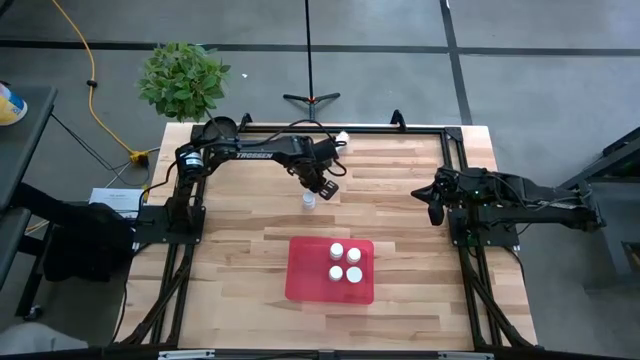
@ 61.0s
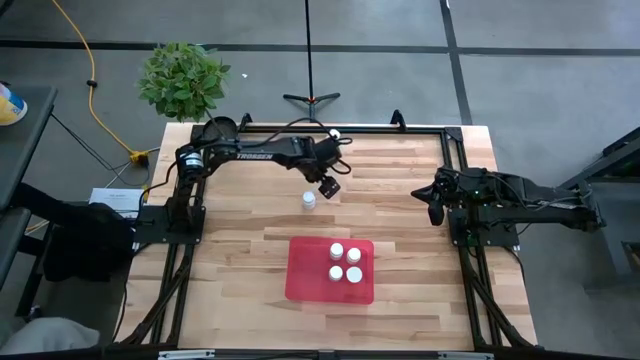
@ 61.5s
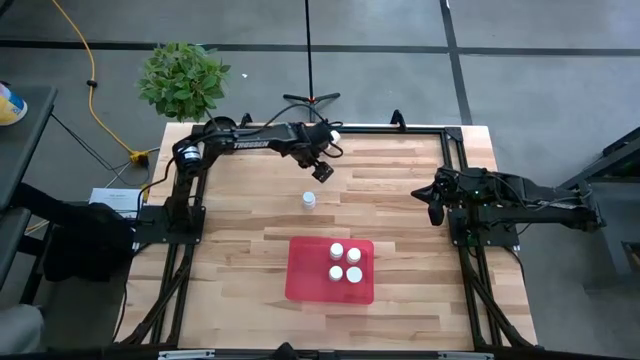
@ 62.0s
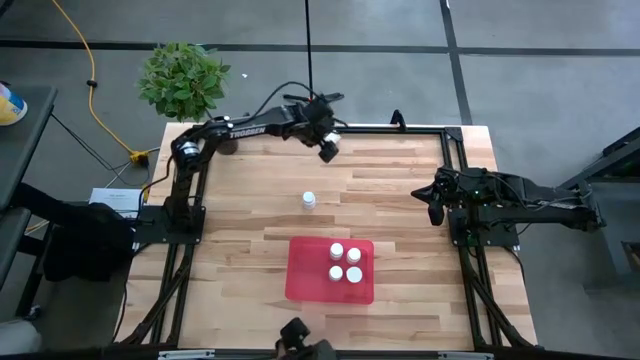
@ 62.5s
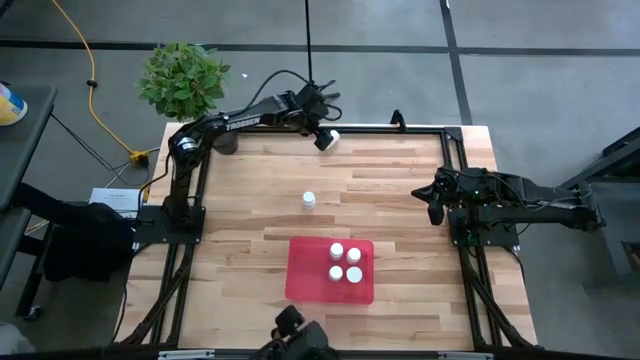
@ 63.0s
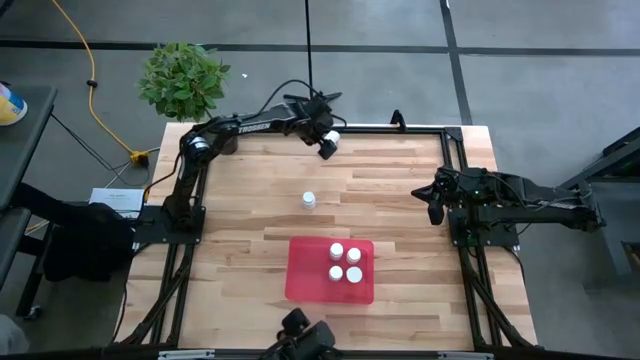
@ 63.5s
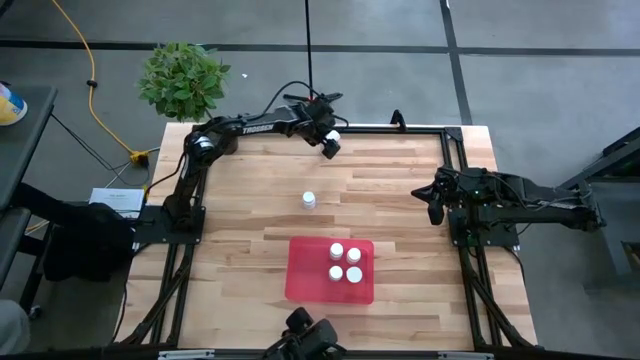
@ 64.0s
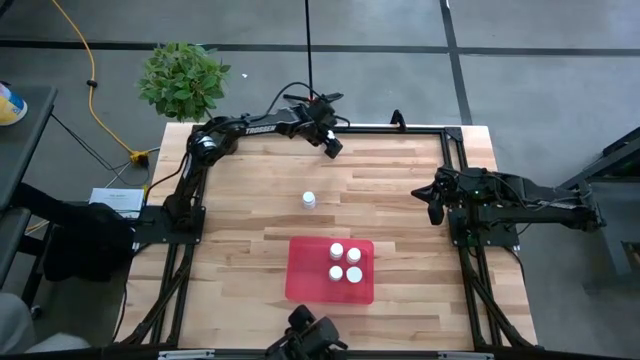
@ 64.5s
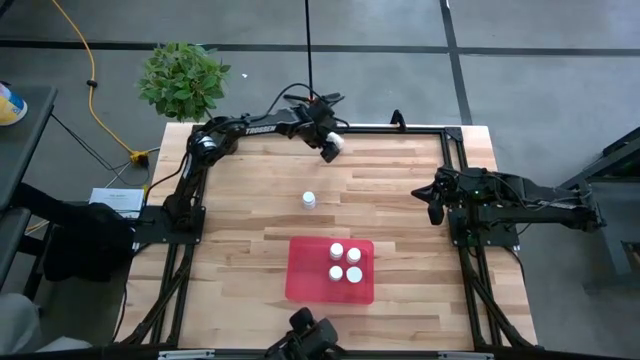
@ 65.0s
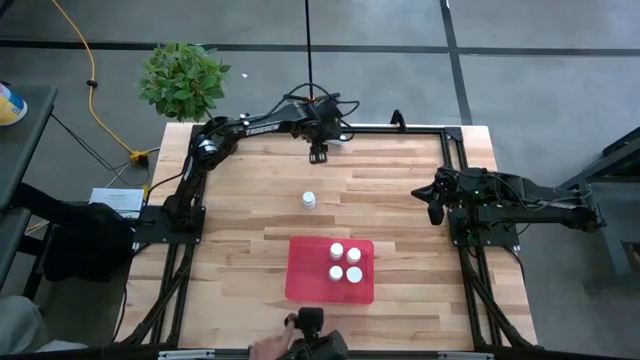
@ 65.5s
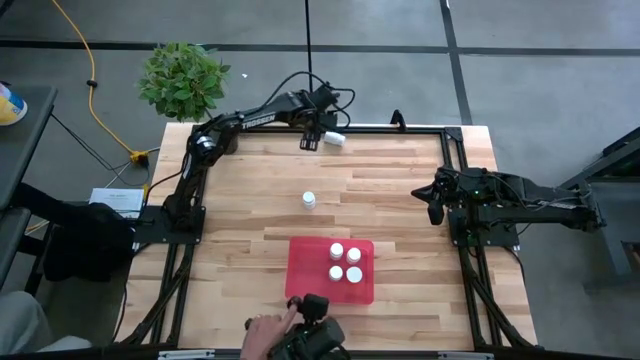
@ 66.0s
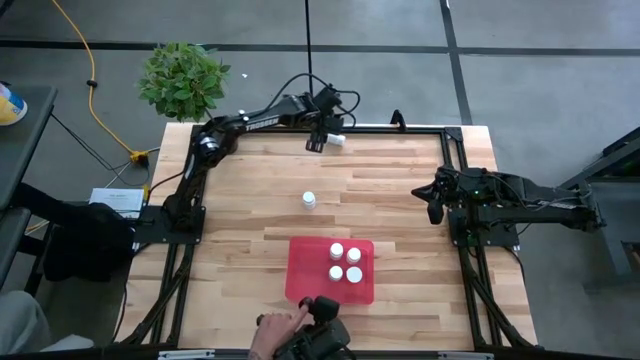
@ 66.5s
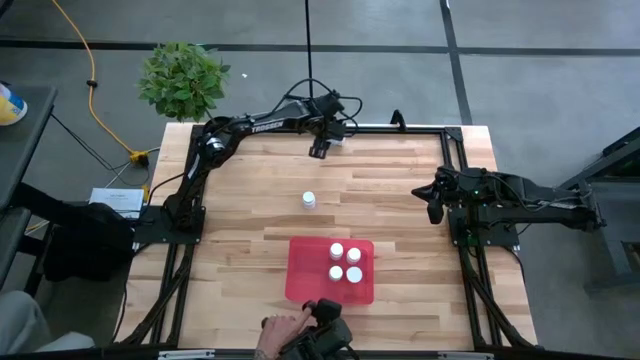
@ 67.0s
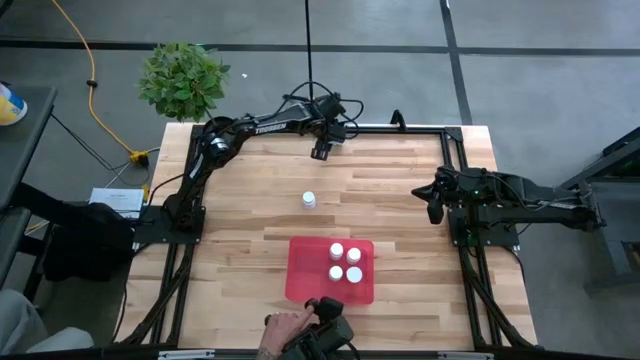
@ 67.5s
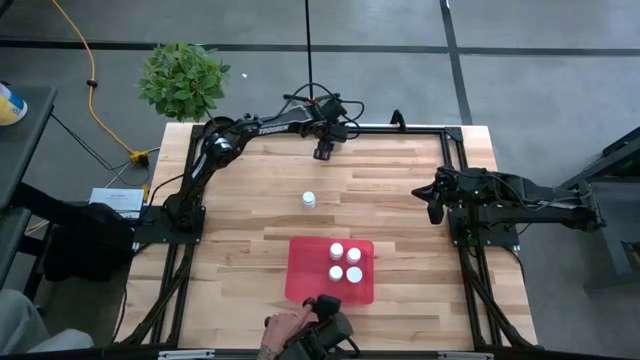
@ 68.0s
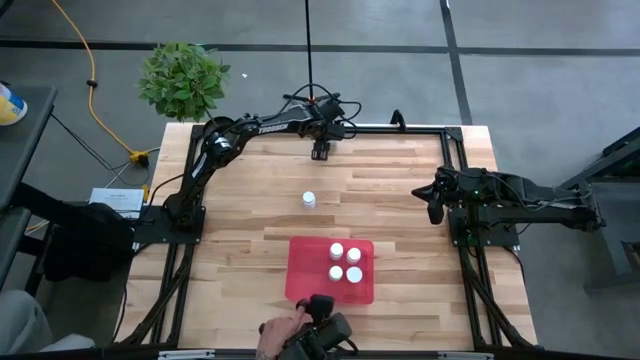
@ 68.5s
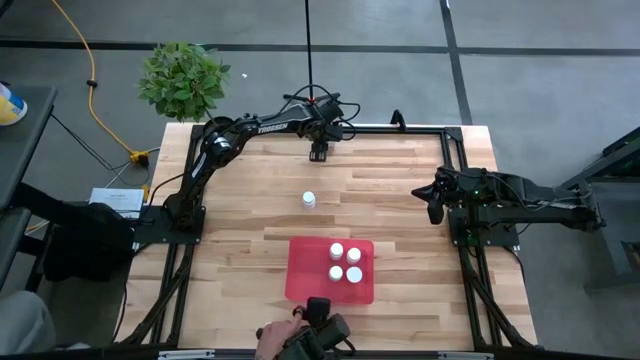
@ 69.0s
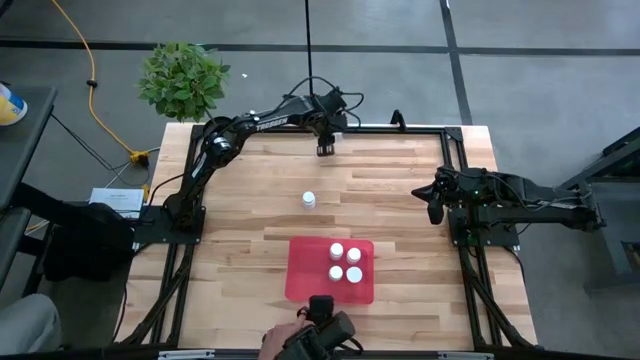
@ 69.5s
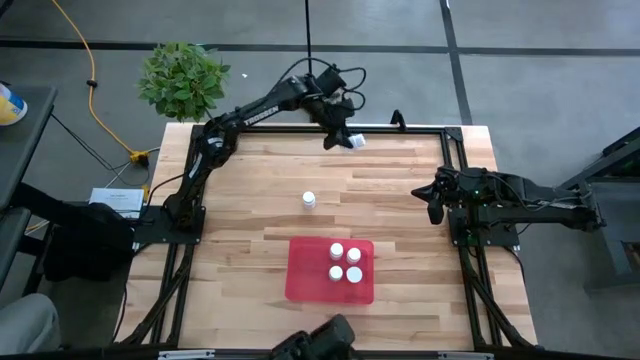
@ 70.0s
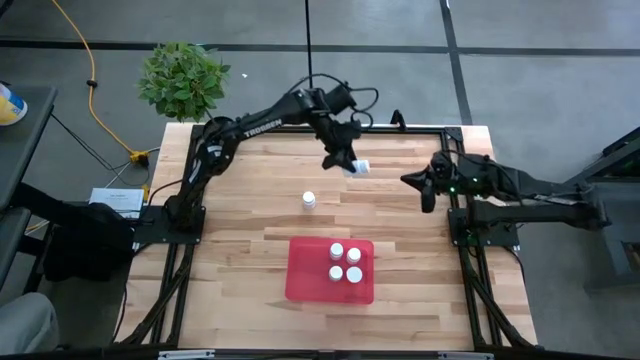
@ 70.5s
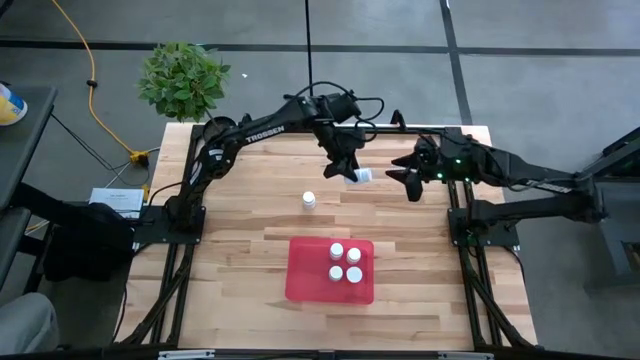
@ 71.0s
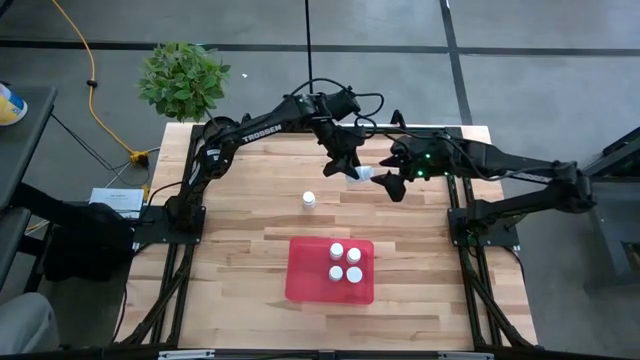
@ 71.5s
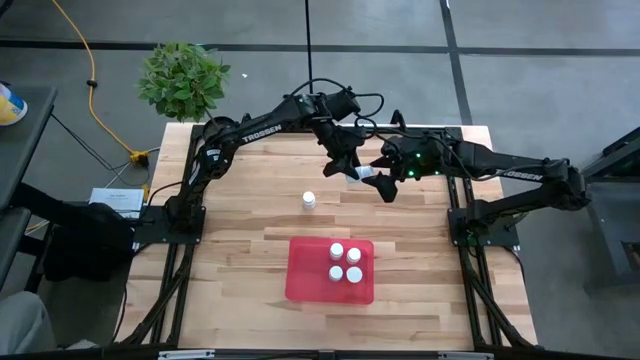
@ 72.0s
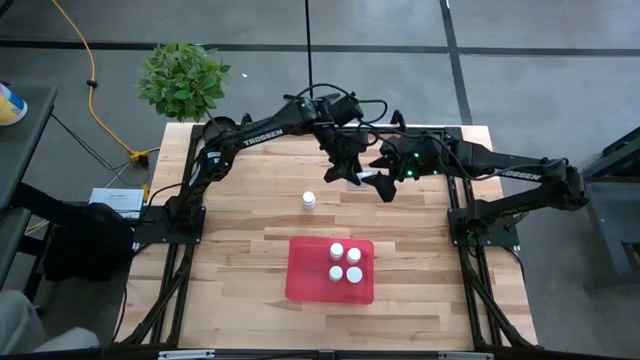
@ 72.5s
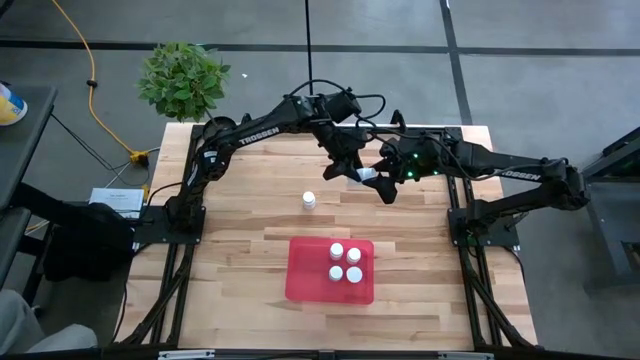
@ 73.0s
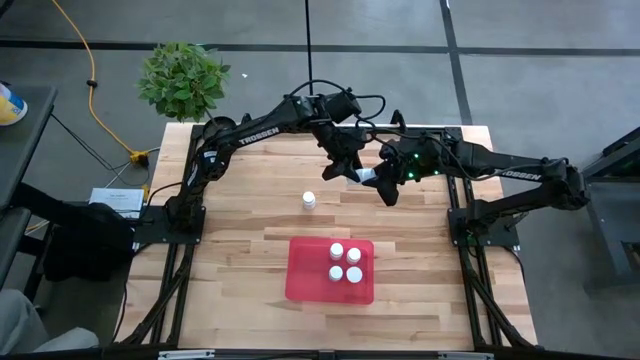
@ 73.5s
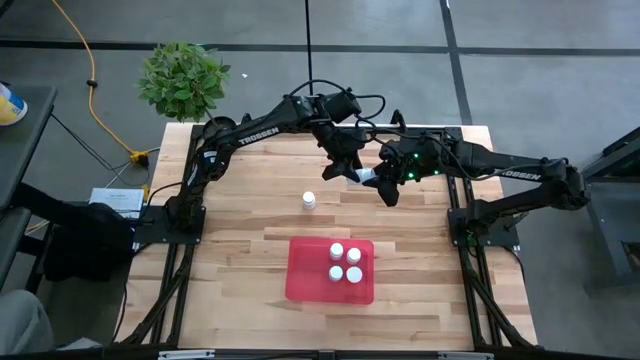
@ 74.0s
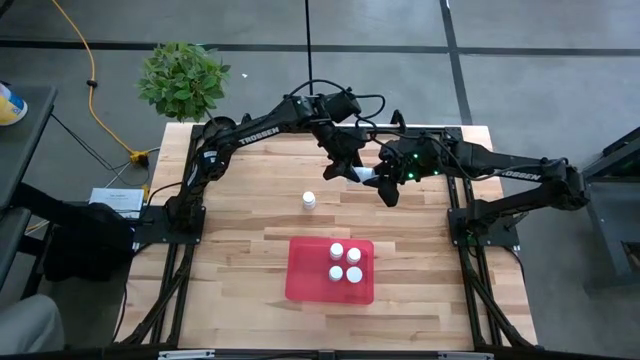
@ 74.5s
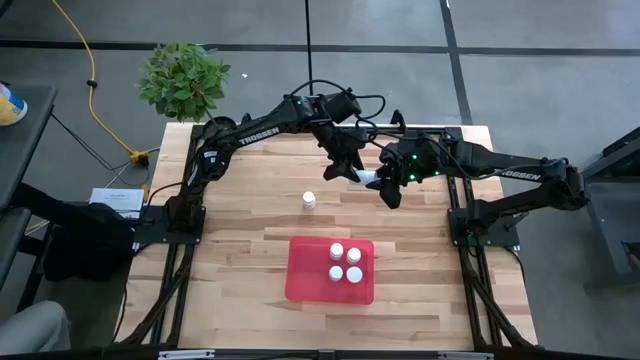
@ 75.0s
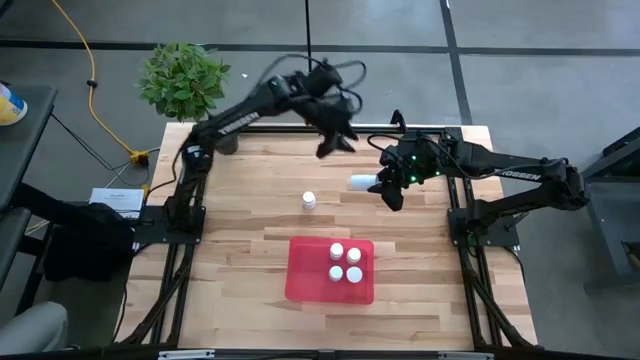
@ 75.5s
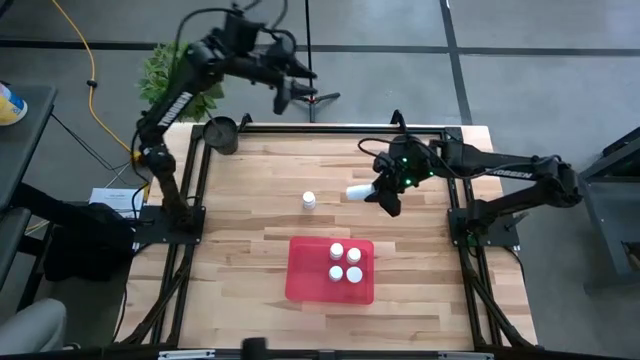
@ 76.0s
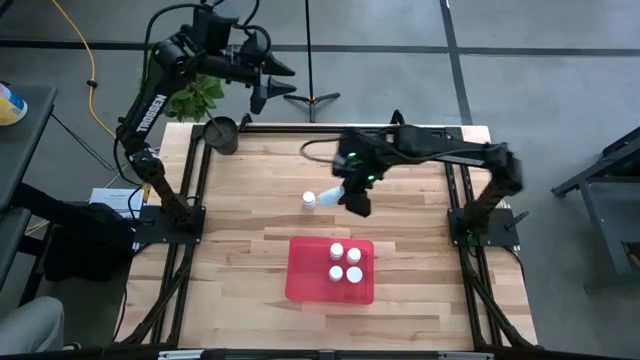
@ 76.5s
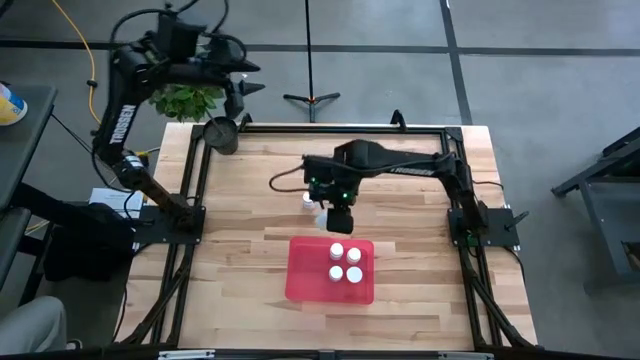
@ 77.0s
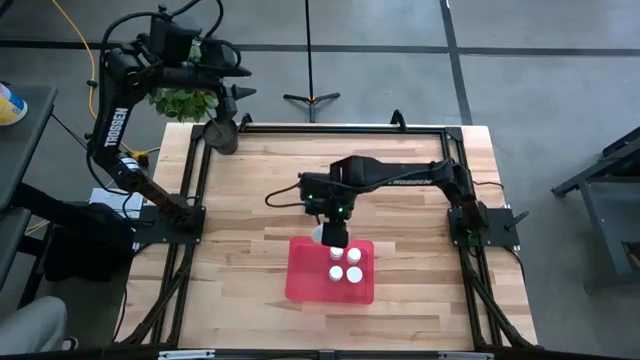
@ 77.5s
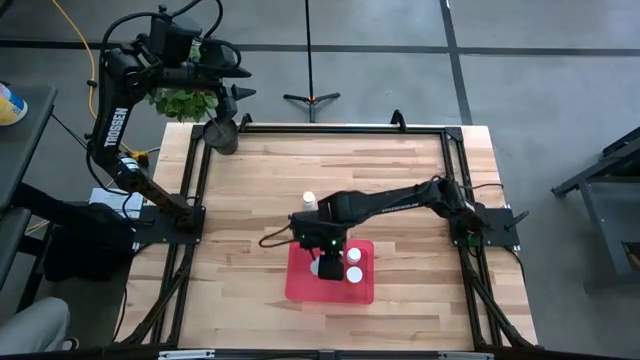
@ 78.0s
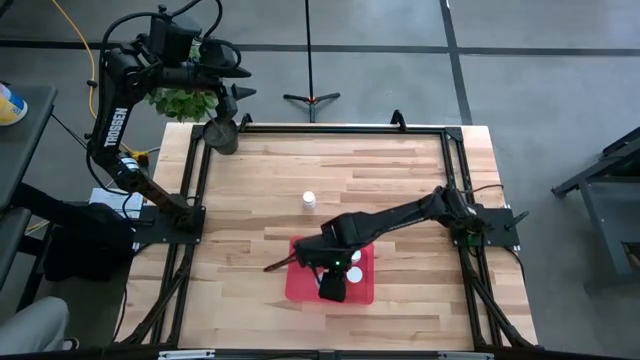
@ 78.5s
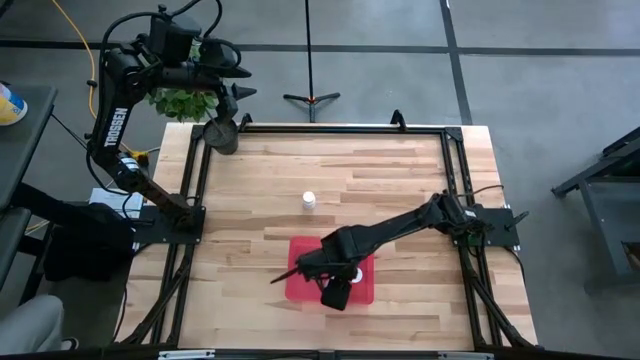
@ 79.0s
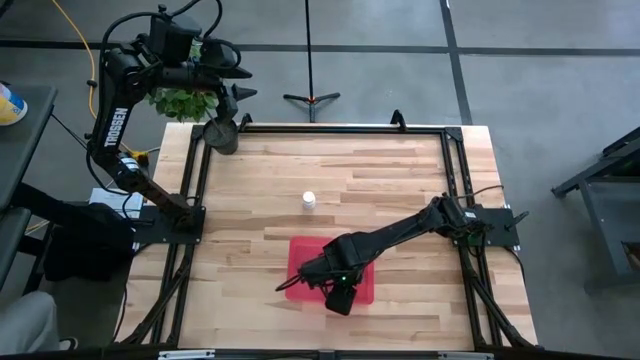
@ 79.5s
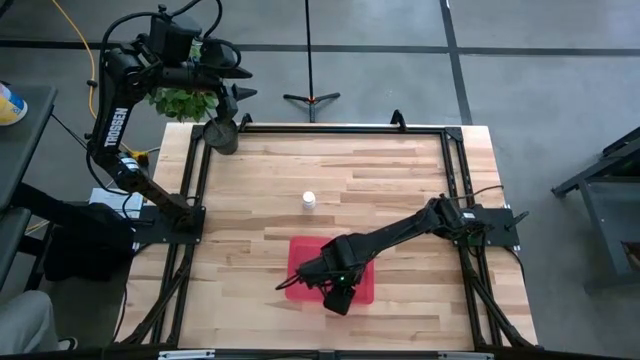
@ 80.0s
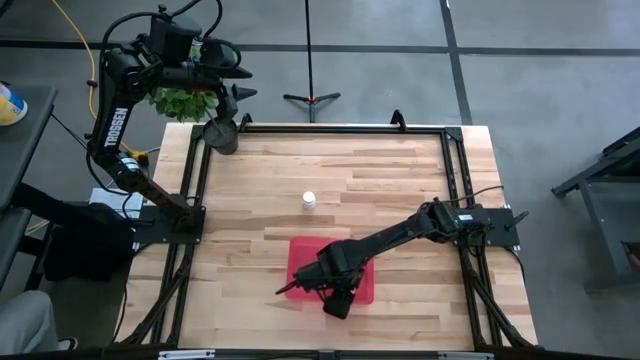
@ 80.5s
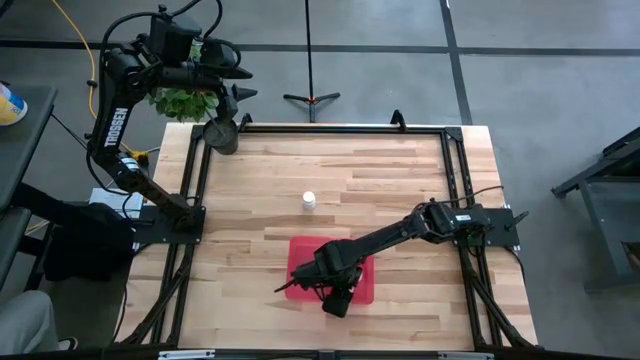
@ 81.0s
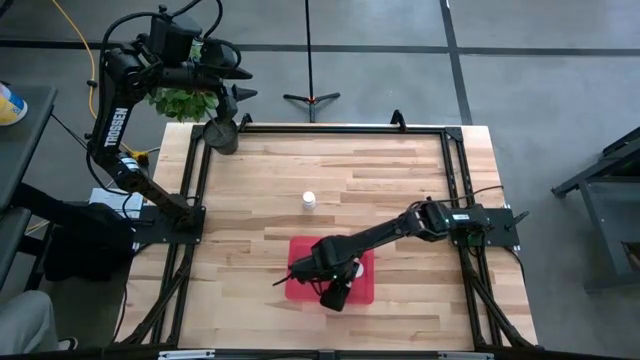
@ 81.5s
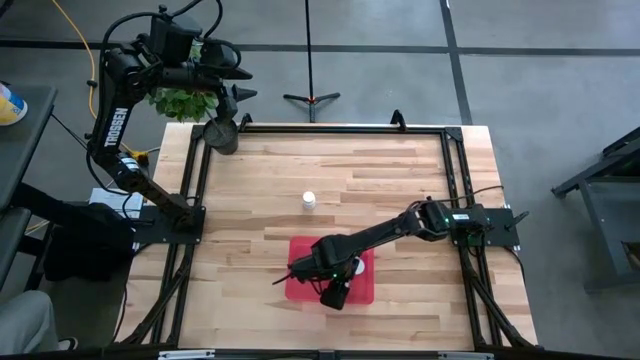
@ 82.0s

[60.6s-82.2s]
Task: Pick and place pill bottles into a basket
Put the top white pill bottle into the bin
